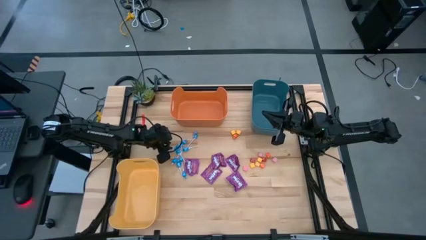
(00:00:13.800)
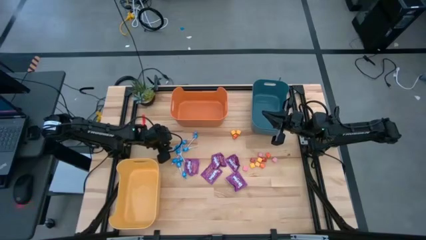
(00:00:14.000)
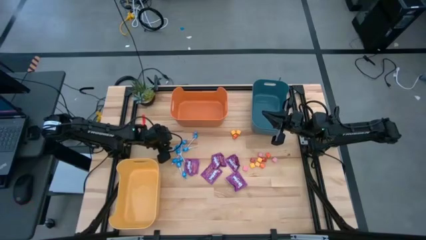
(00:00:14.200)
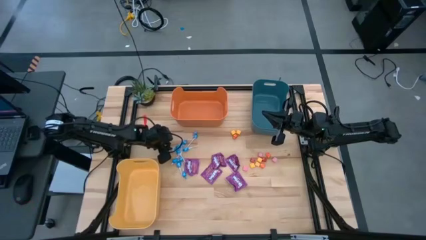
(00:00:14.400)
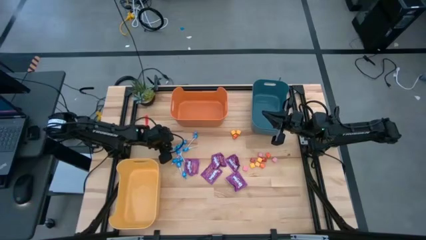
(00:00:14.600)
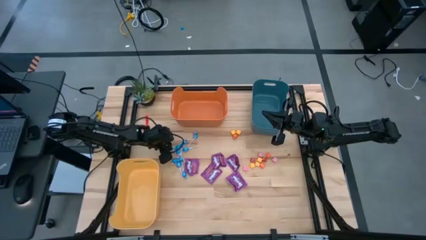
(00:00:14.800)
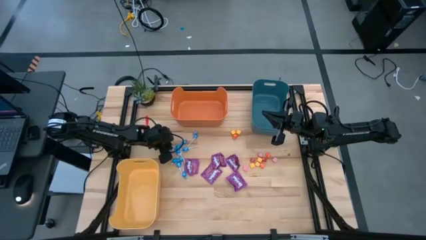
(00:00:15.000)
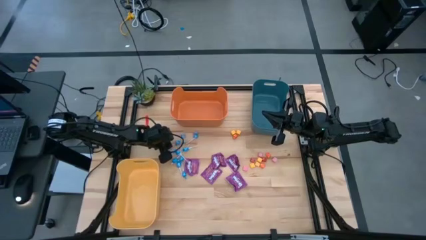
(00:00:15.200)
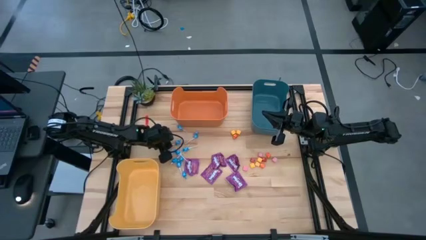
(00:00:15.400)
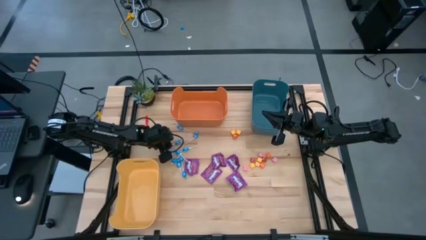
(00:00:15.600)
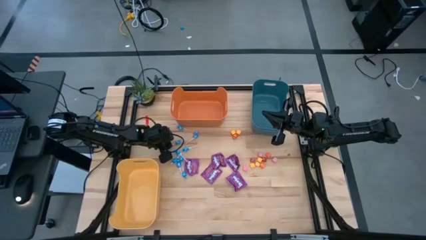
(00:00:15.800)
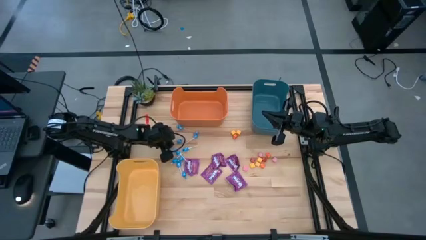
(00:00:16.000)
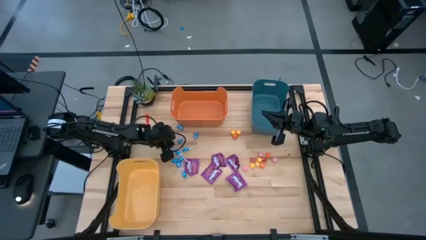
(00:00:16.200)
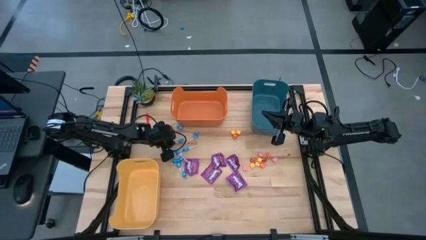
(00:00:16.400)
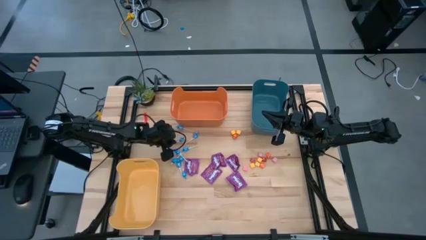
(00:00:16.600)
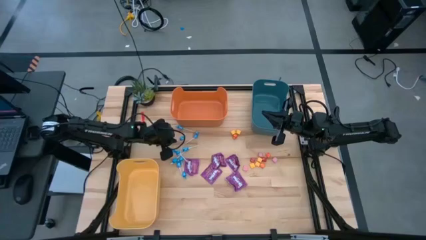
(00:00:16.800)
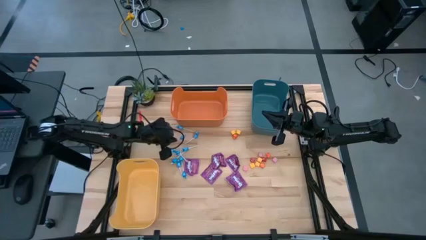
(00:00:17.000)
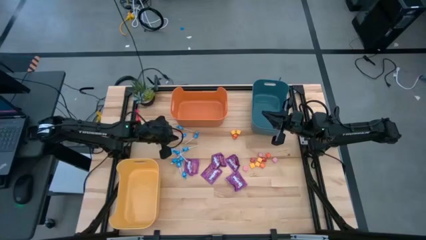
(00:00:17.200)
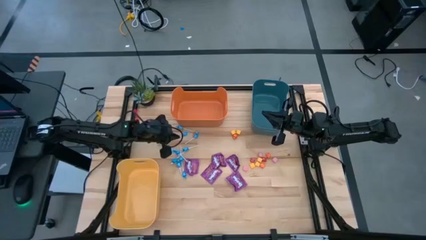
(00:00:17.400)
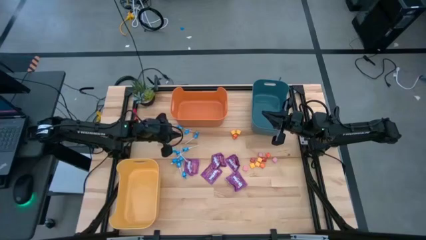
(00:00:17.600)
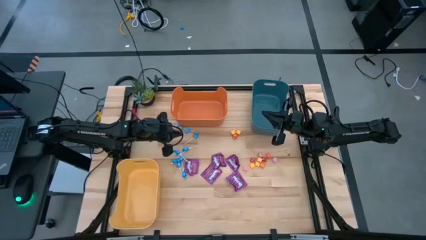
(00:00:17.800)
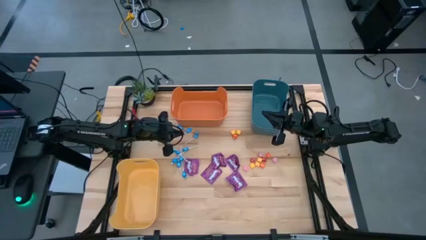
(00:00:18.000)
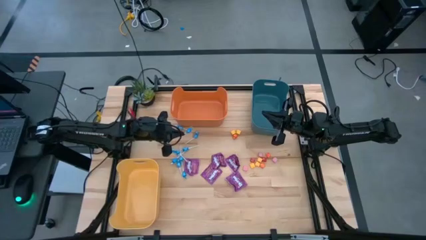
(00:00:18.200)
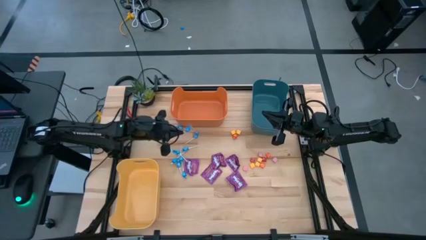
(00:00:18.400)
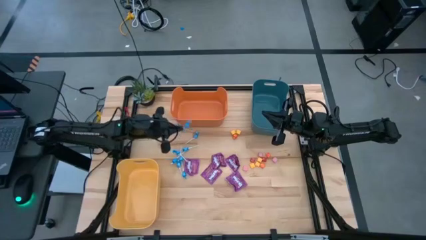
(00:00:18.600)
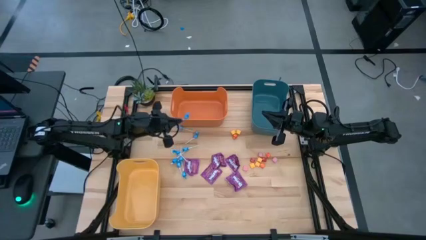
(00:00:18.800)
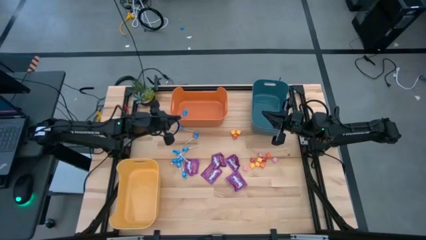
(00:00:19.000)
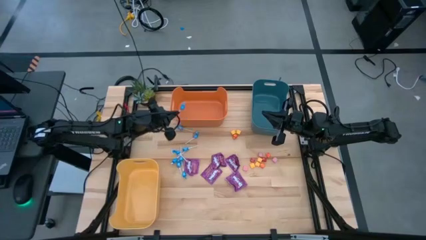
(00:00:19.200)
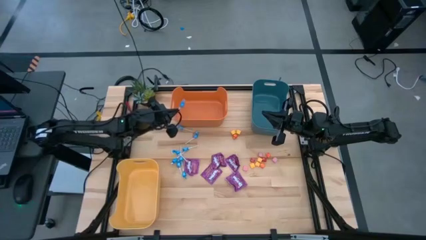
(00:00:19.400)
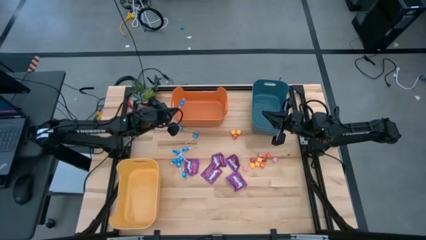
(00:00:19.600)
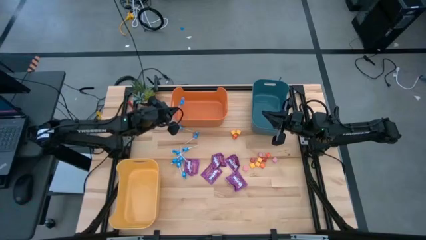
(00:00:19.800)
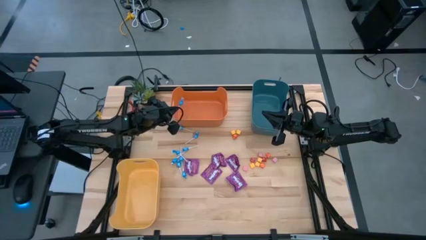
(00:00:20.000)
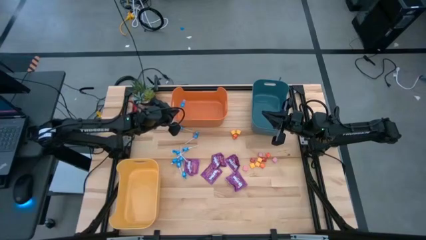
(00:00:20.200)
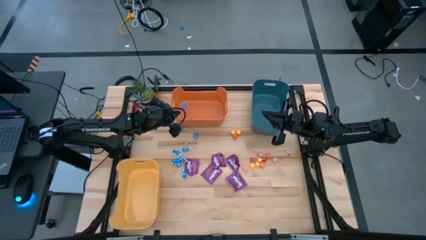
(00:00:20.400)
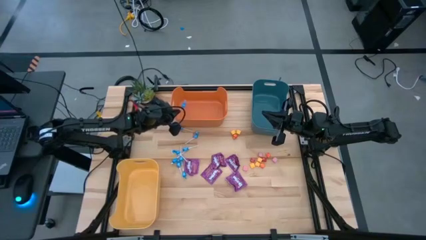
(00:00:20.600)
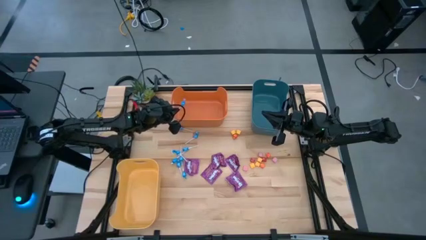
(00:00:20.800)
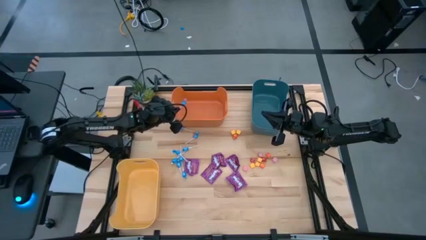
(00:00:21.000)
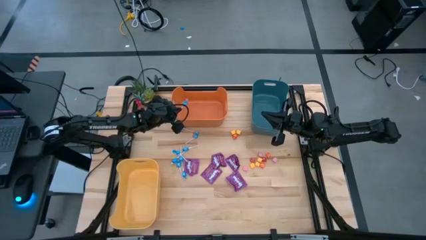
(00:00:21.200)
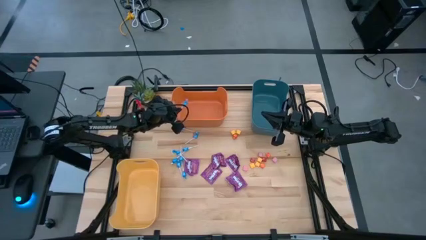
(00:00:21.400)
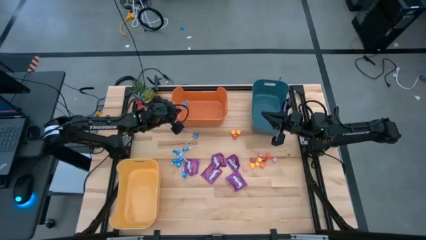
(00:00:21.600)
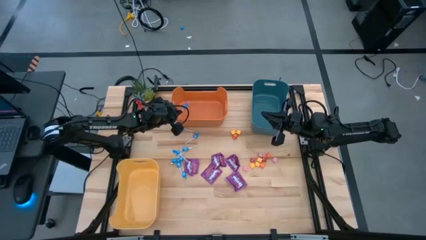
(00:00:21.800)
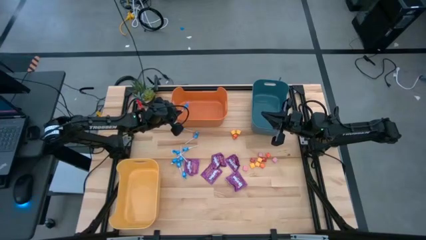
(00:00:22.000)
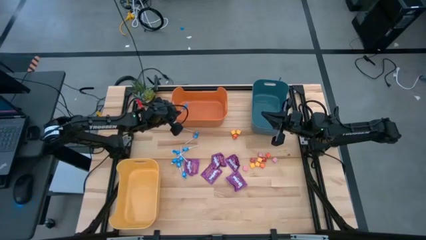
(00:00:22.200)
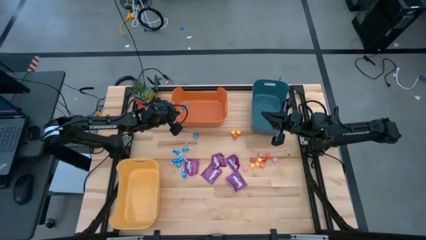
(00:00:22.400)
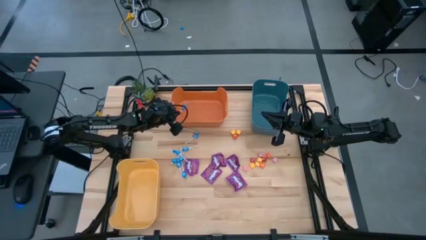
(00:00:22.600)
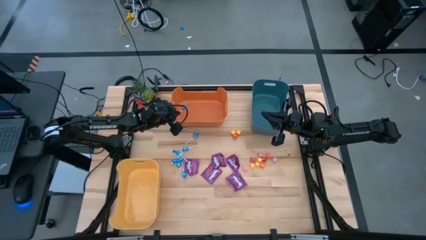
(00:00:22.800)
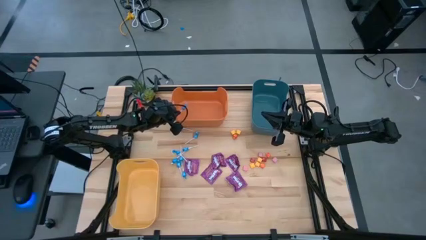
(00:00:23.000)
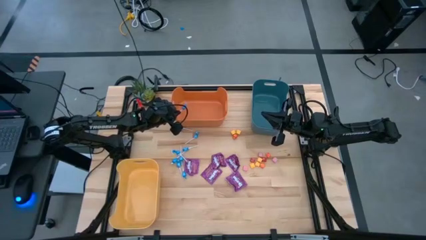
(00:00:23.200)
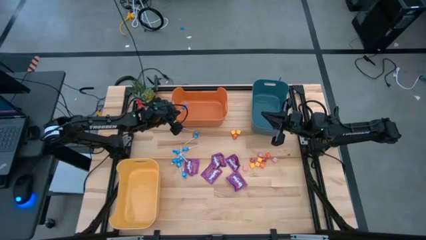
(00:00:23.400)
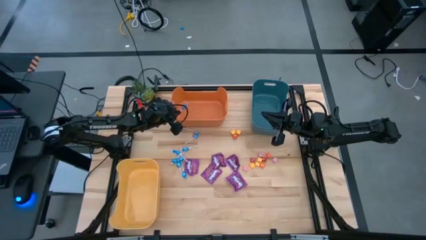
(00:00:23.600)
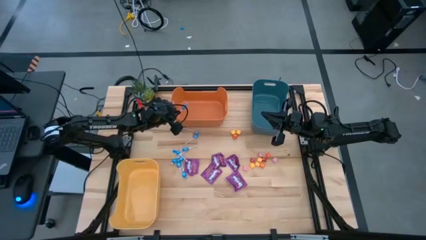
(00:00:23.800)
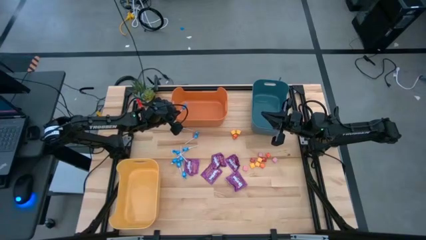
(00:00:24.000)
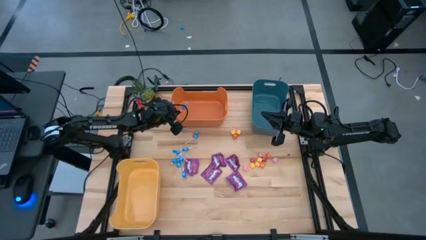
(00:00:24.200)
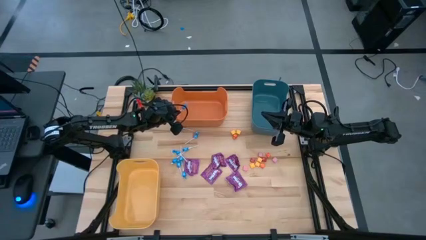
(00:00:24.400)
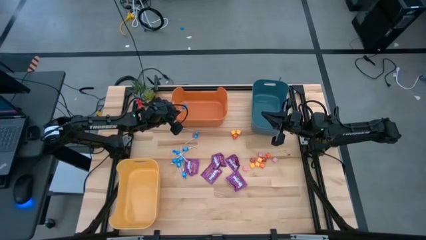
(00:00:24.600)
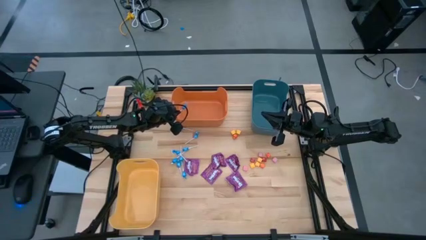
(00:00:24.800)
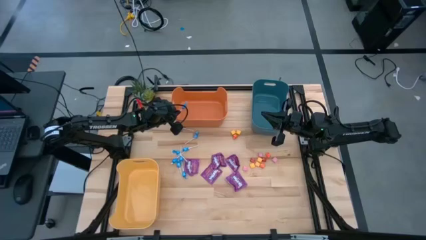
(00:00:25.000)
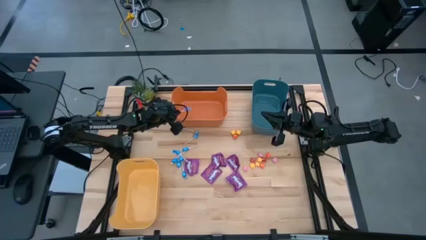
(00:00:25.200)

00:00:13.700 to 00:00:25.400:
Task: Sort candy
Put the blue candy into the orange bin
